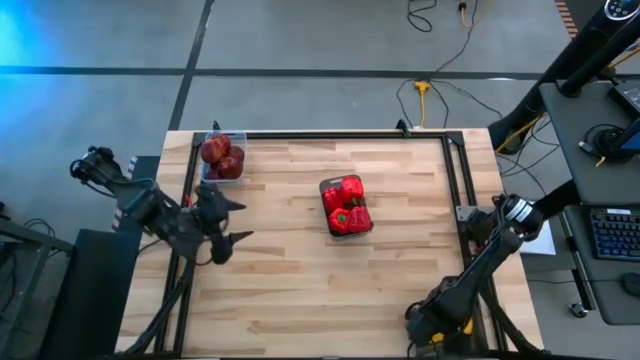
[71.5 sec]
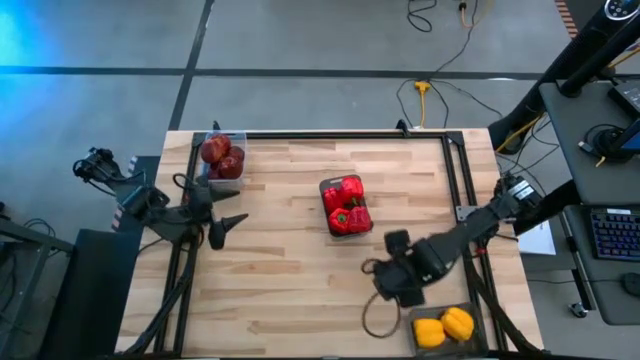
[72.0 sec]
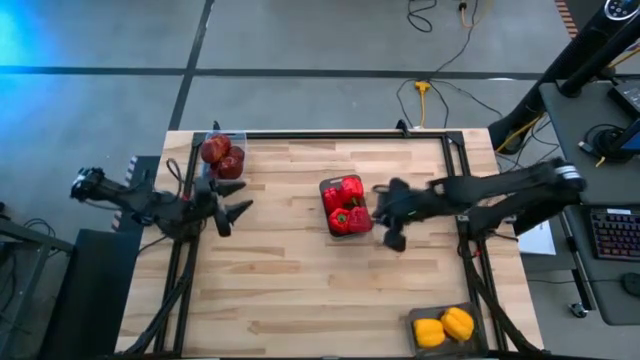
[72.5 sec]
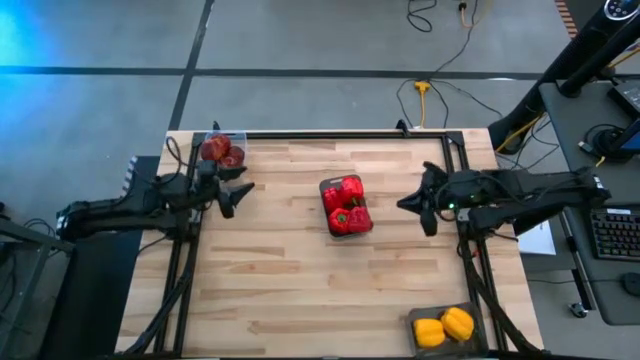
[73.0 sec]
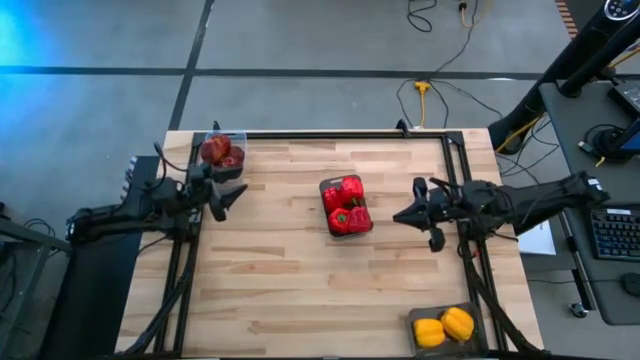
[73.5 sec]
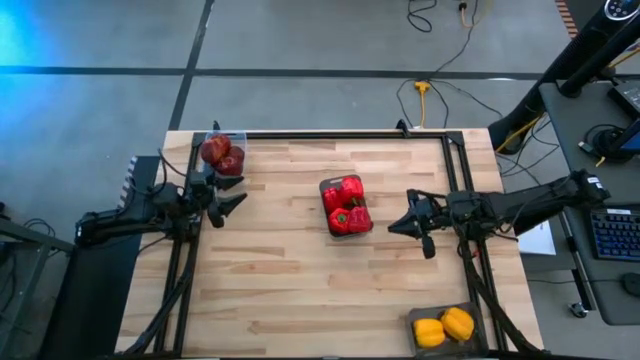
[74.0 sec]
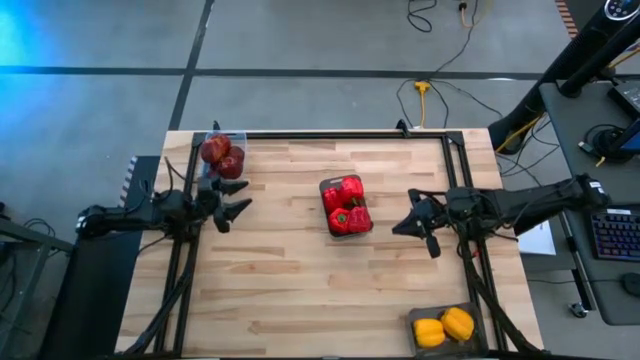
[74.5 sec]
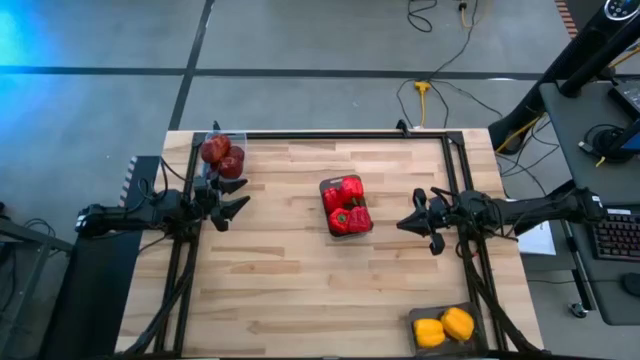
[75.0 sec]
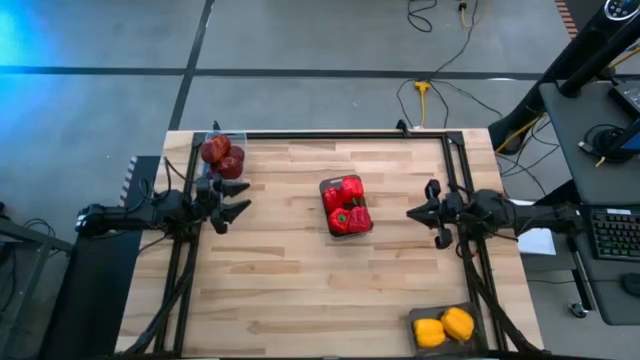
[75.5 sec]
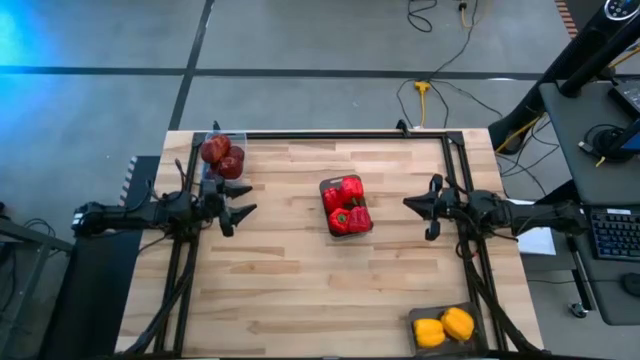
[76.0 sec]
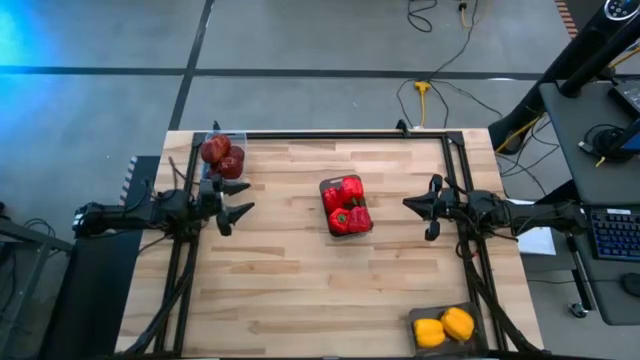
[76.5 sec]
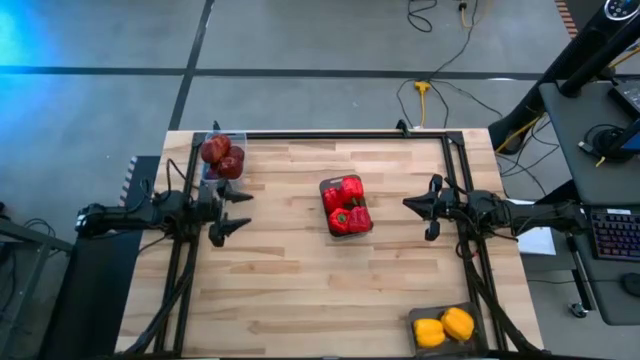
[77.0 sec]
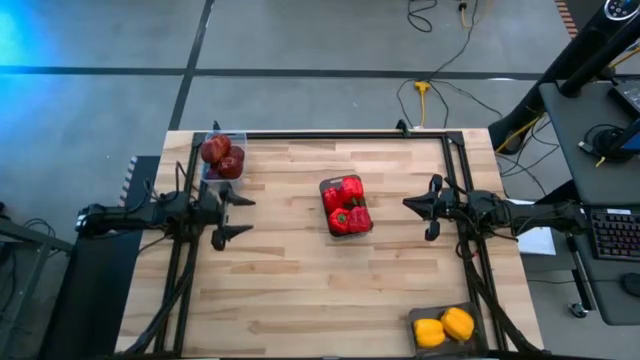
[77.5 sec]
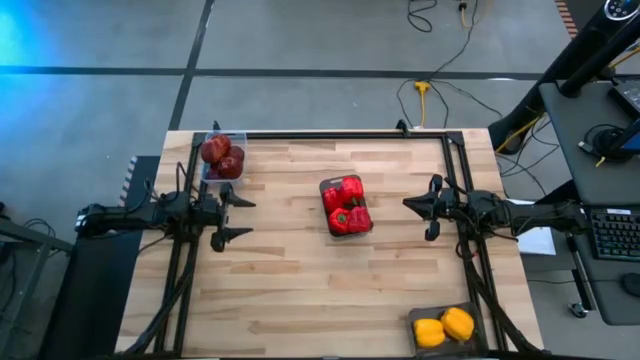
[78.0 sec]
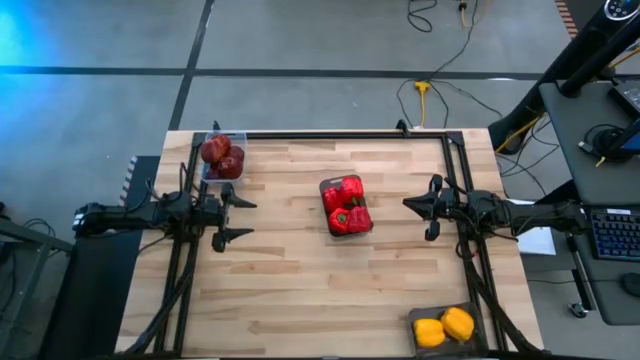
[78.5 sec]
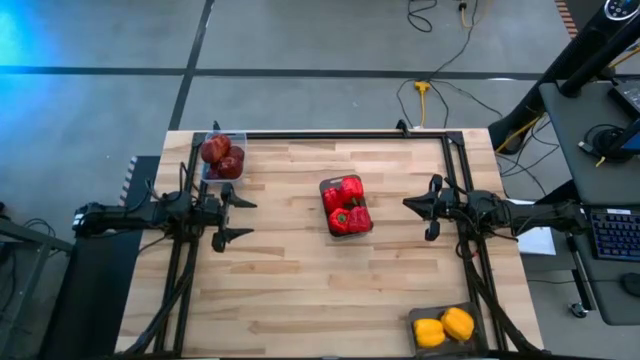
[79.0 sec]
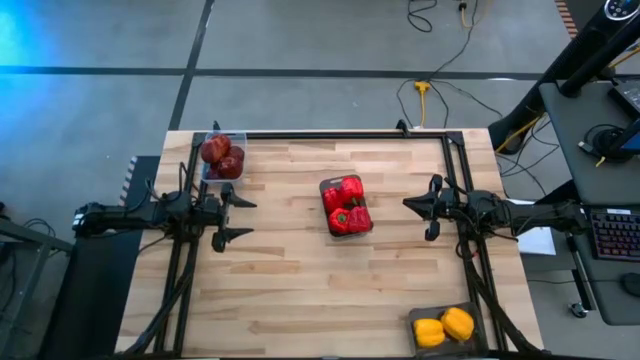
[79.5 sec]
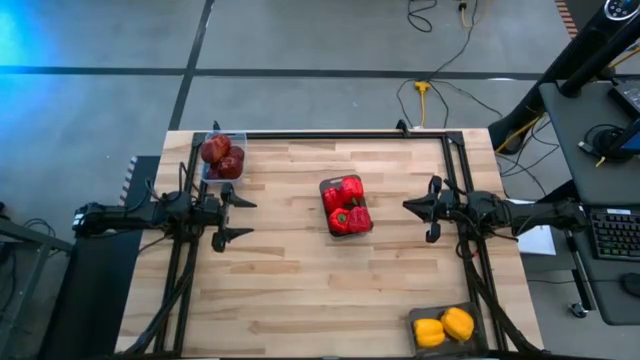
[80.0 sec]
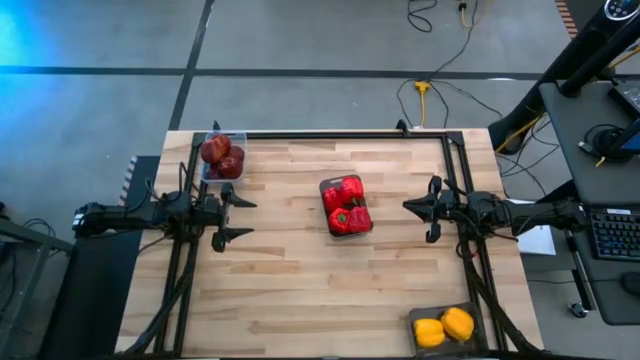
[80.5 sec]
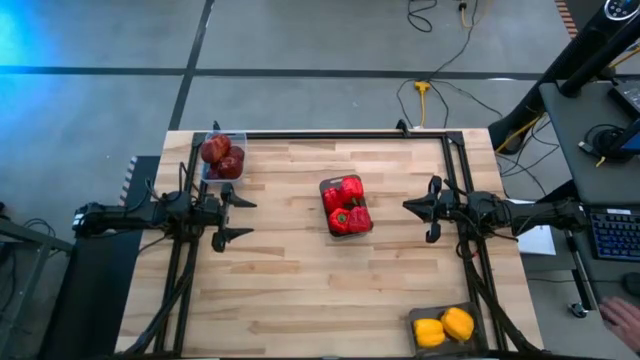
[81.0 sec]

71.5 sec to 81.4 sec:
Task: Sort produce into baskets
Return to Home Position

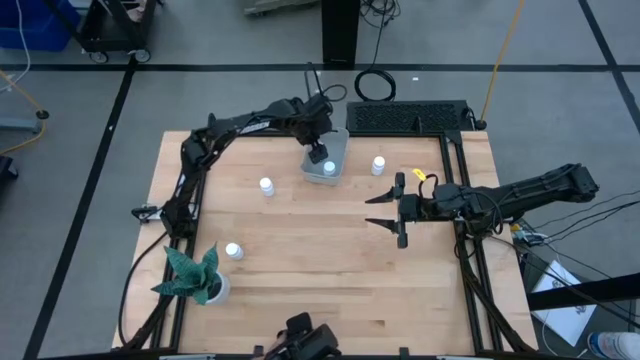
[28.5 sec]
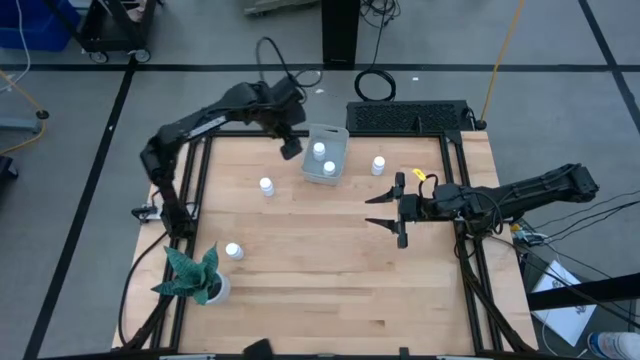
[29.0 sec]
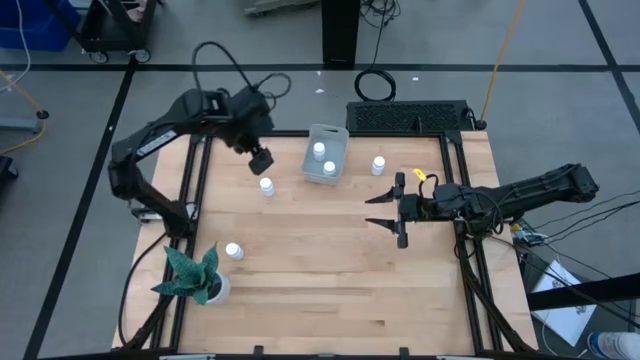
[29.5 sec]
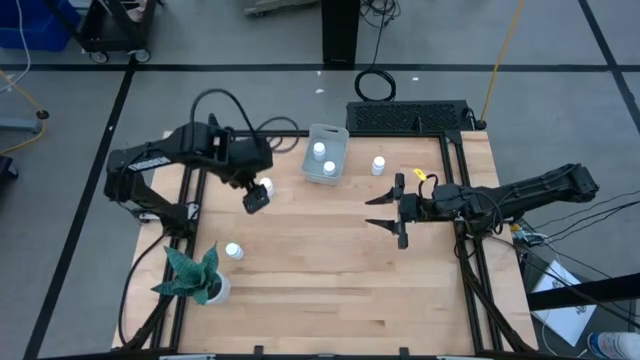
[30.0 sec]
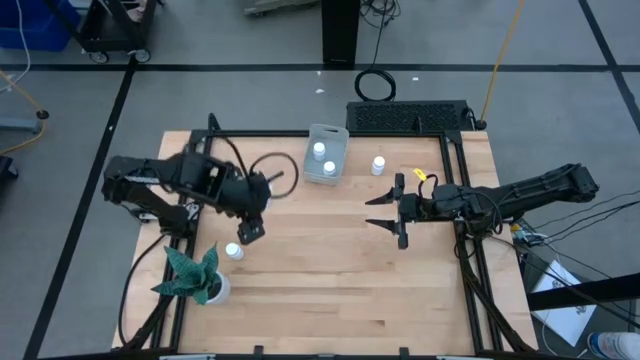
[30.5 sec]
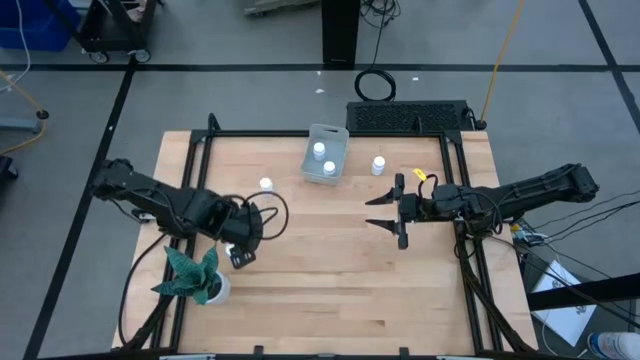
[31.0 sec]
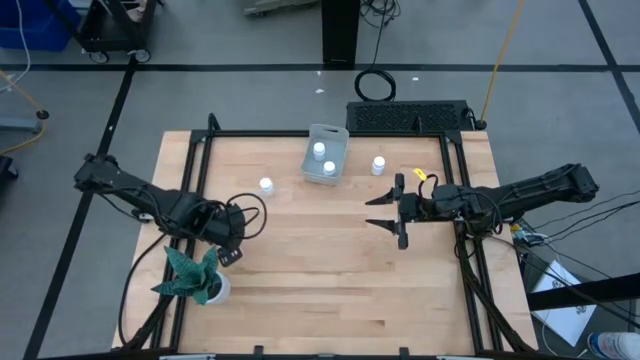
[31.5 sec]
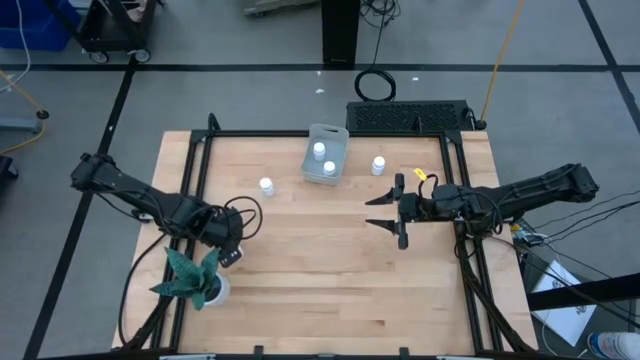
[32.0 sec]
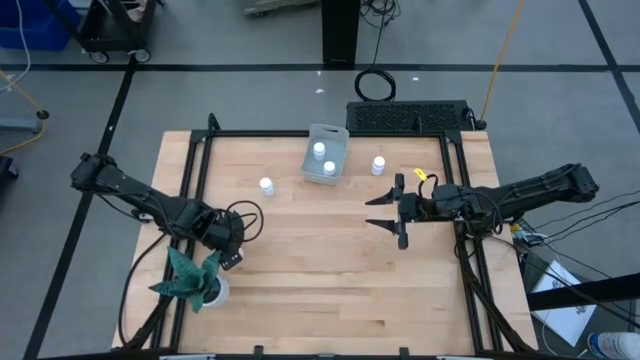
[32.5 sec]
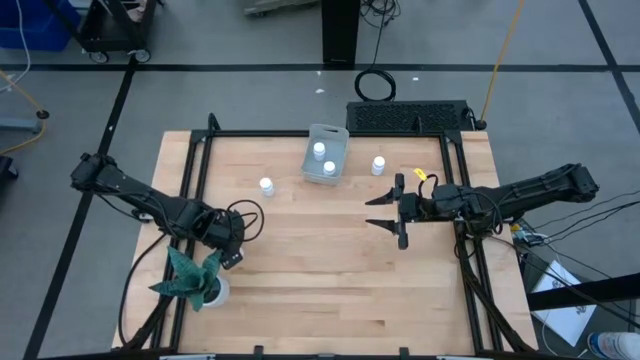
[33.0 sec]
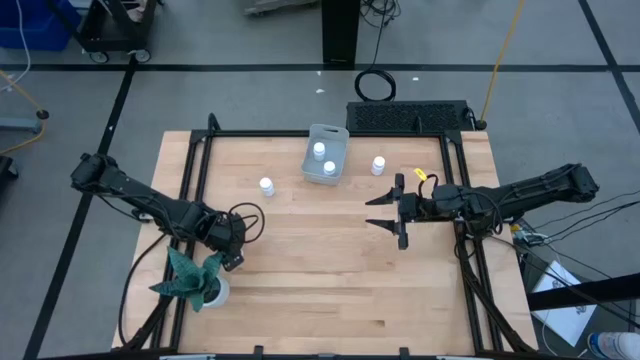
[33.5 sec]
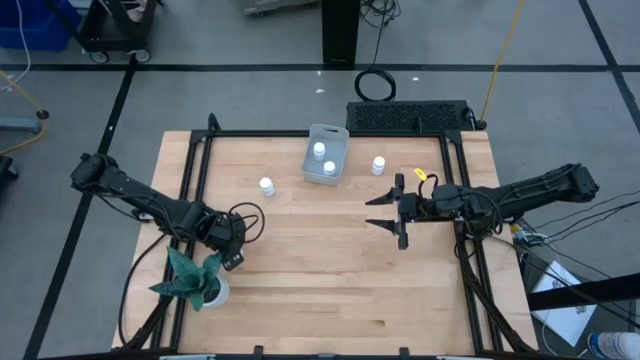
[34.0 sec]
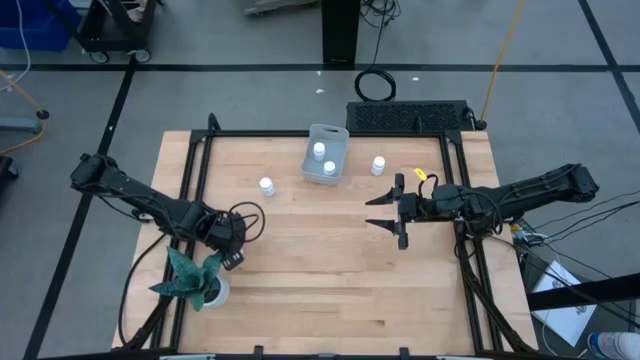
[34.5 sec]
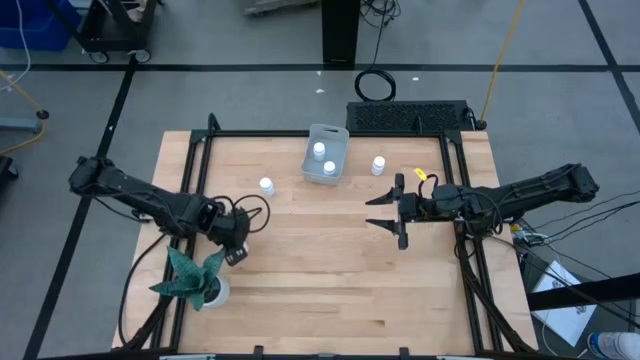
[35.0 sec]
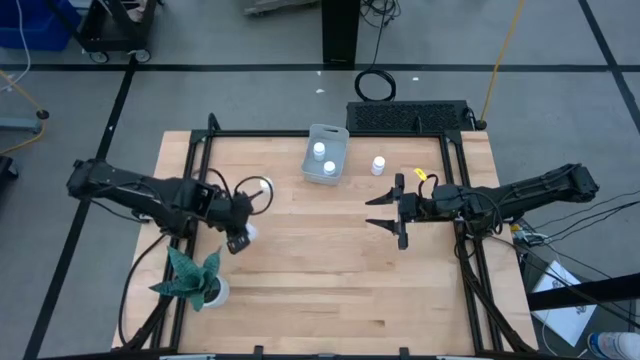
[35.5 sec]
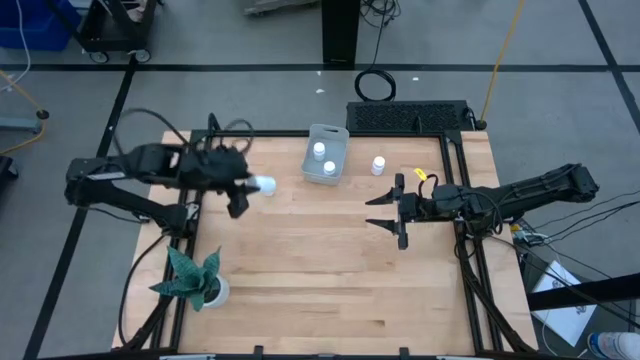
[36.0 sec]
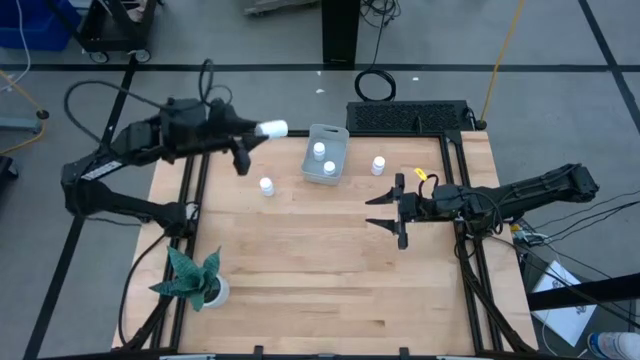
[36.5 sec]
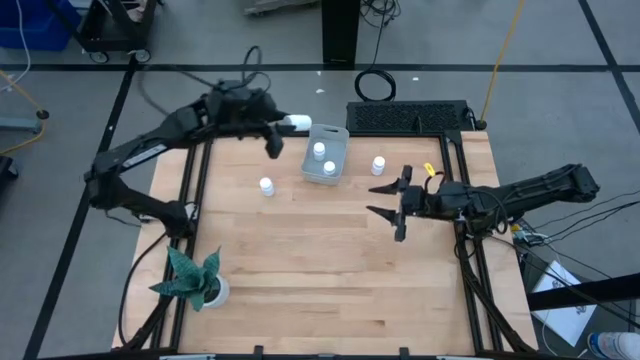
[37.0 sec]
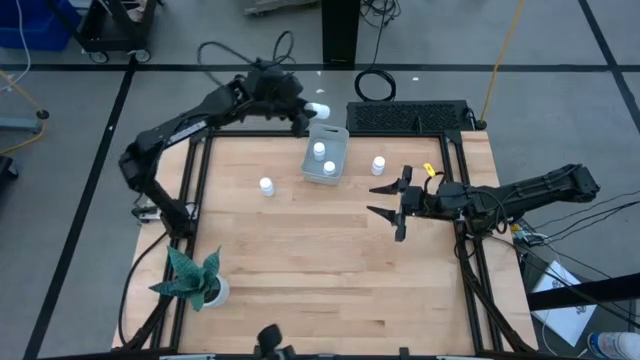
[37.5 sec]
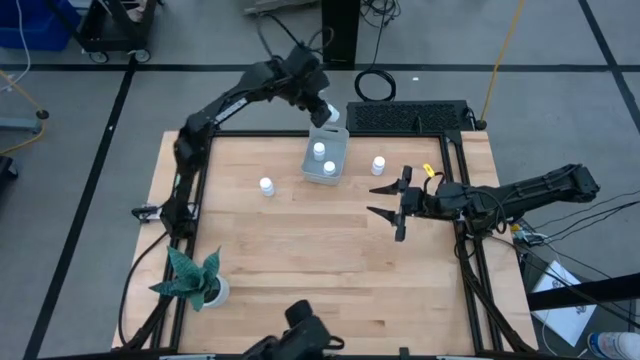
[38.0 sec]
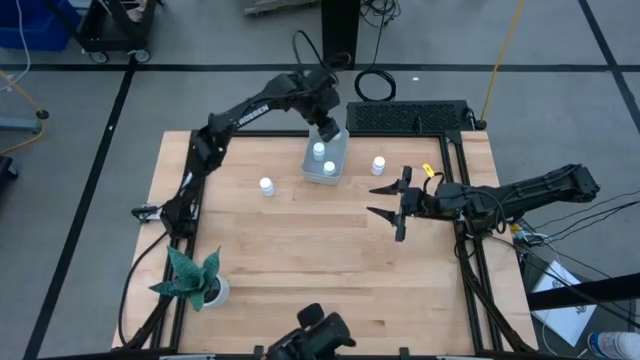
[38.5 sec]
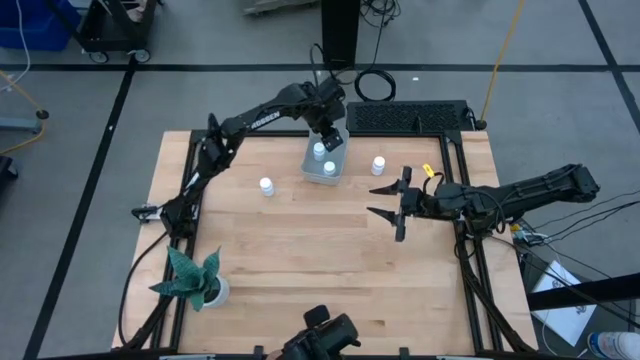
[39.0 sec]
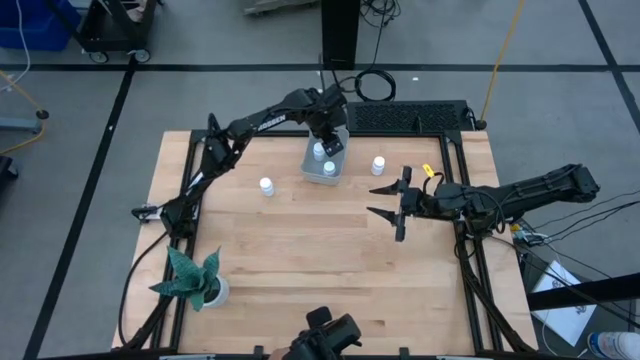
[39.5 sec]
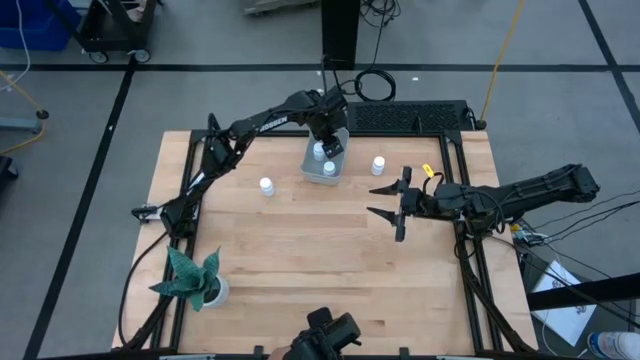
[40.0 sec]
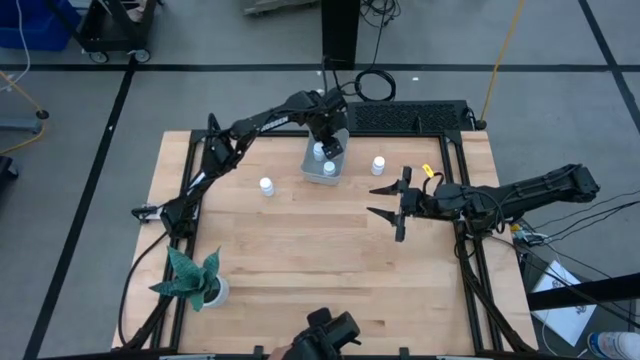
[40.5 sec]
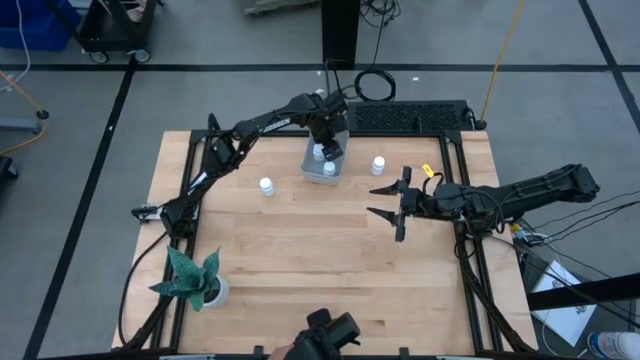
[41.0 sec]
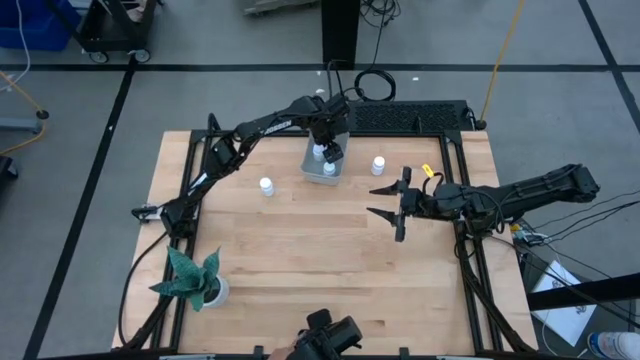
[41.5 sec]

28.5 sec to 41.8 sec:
Task: Pick and place pill bottles into a basket
Put the white medicine bottle into the gray bin
